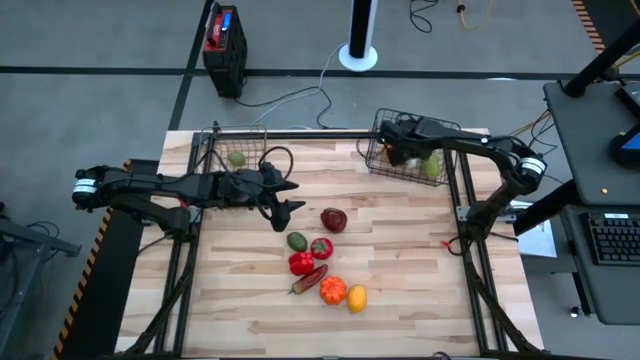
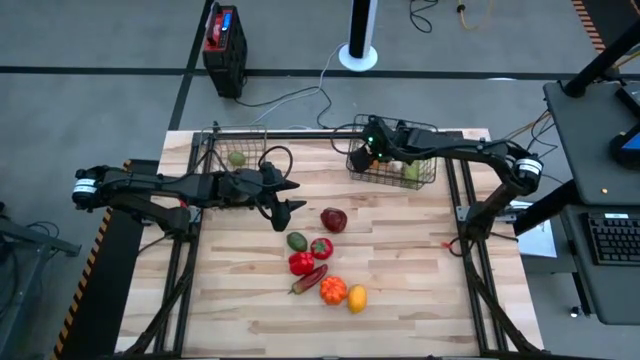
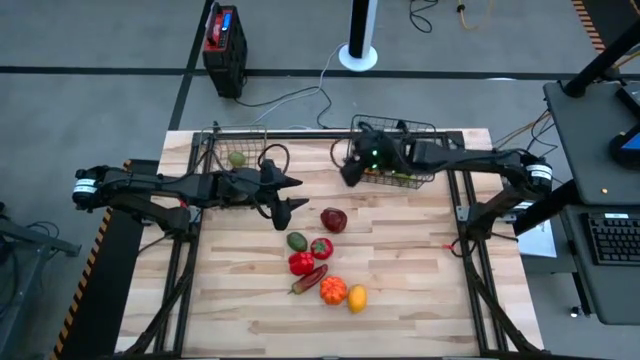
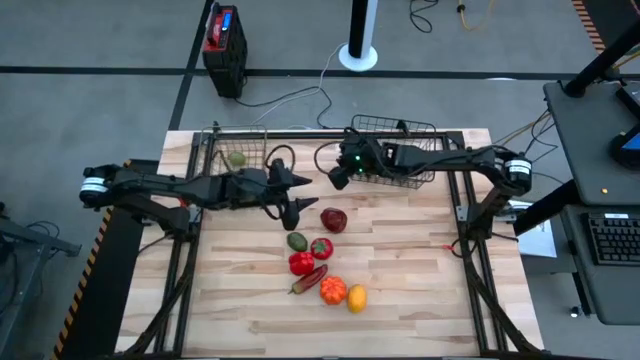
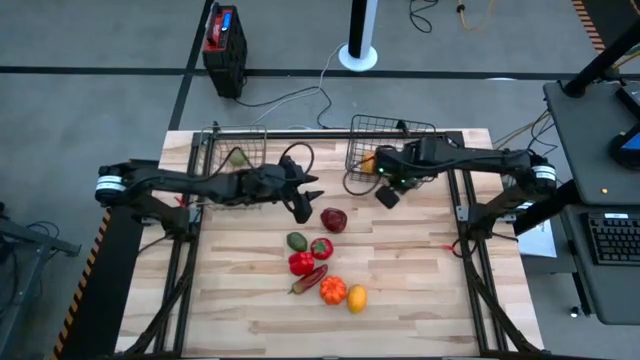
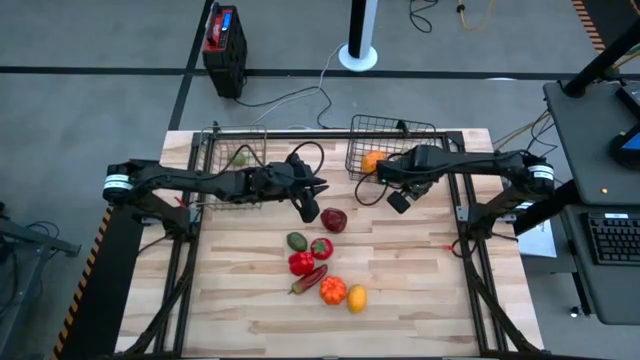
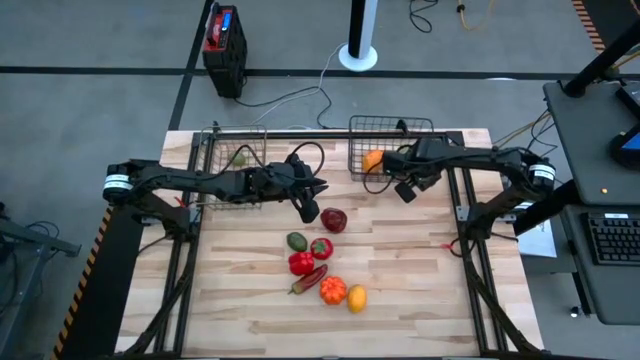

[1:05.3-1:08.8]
Task: Sort produce into baskets
Adjust the black wire basket

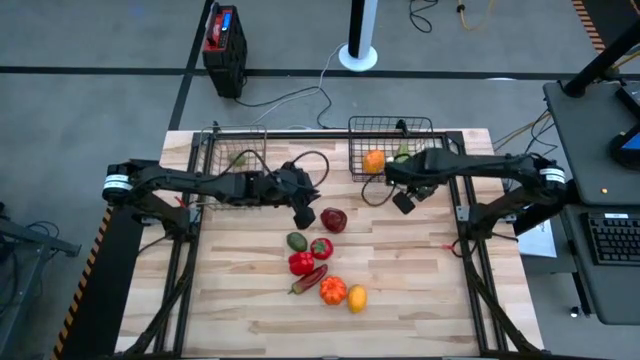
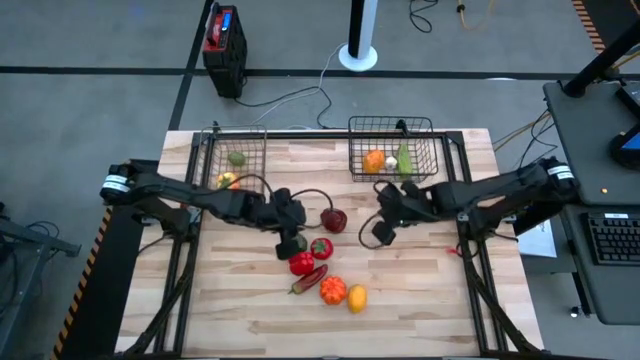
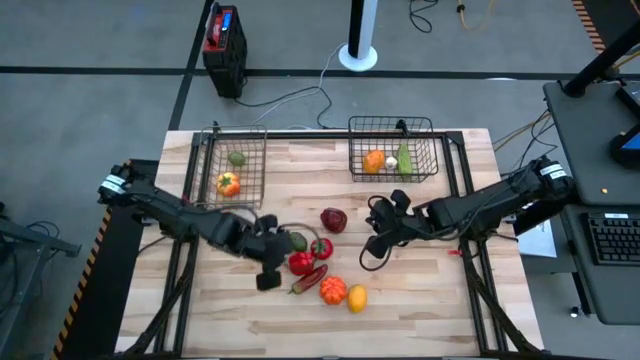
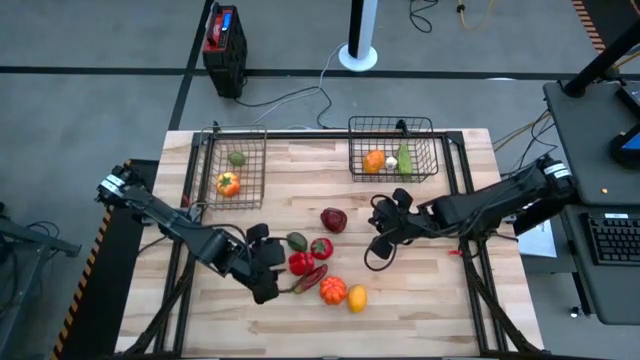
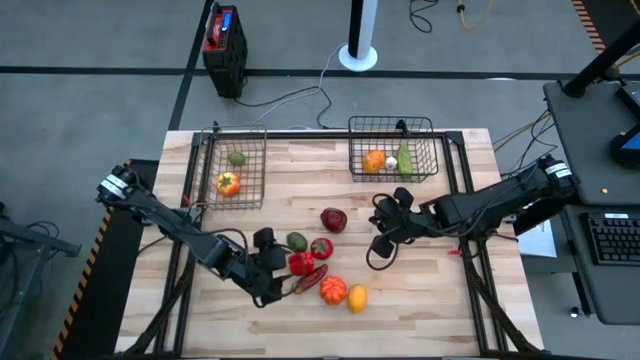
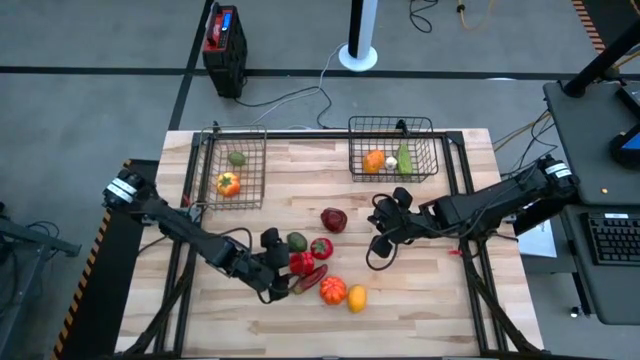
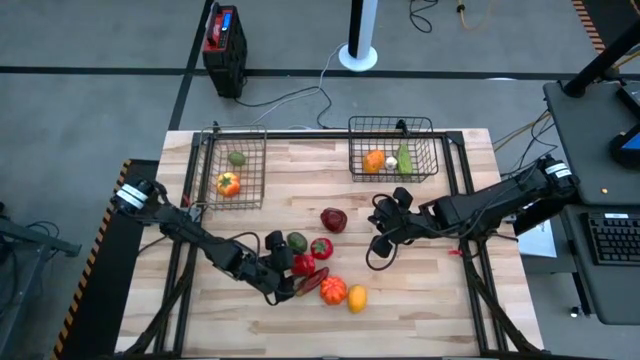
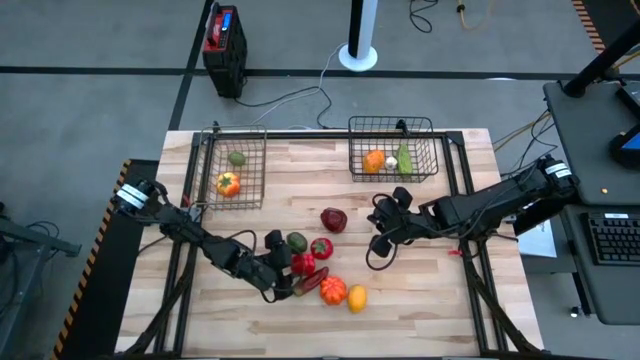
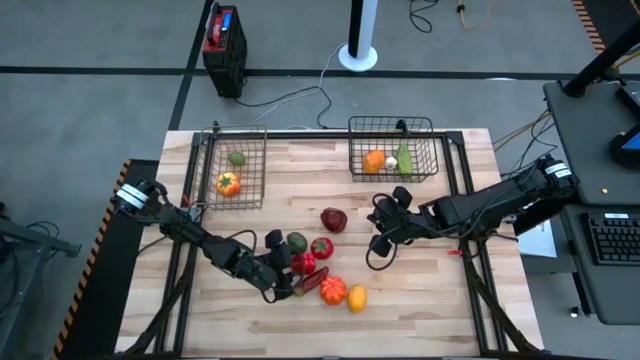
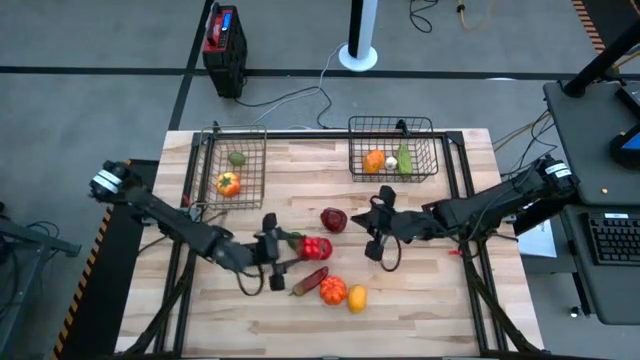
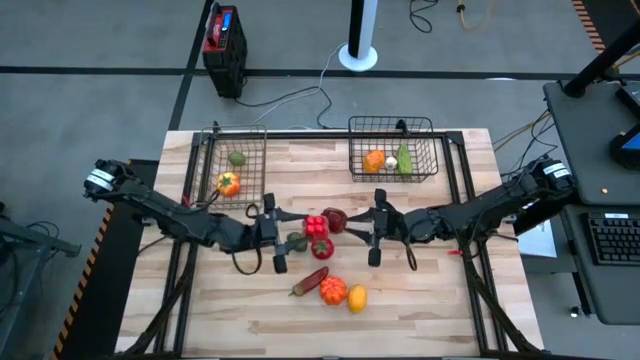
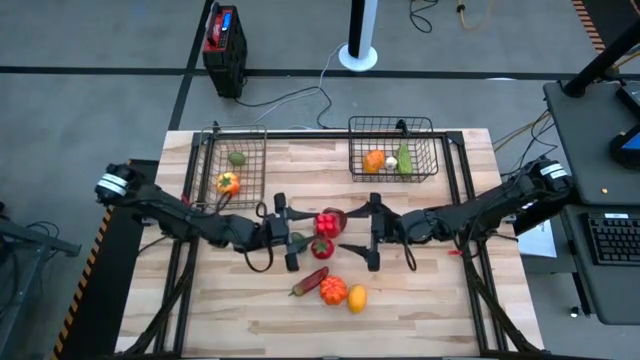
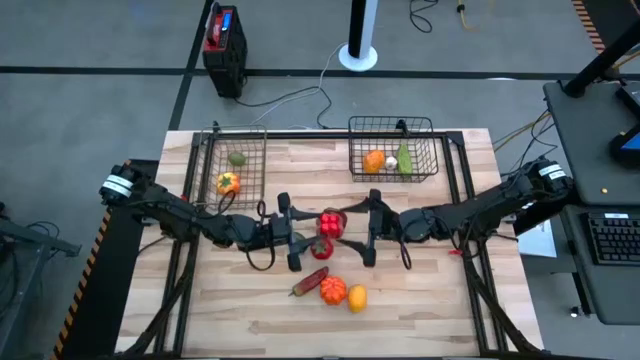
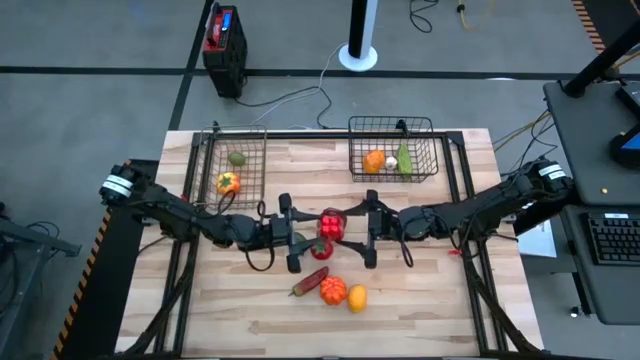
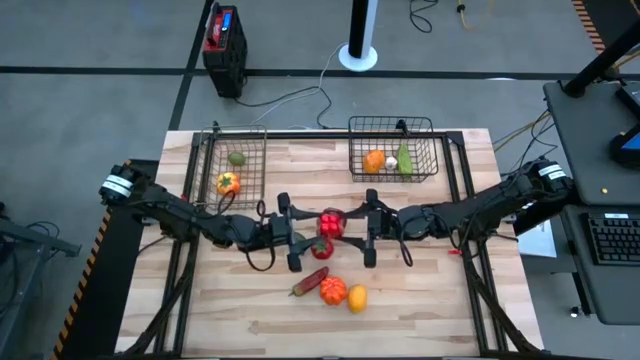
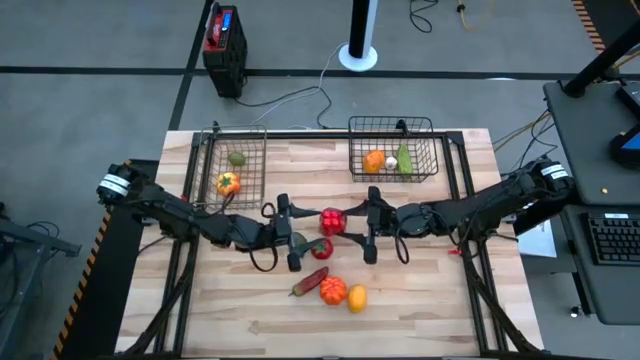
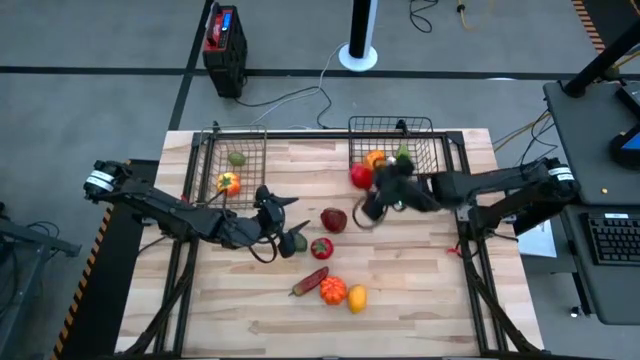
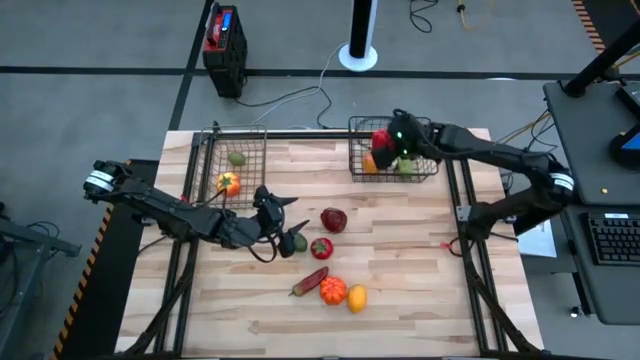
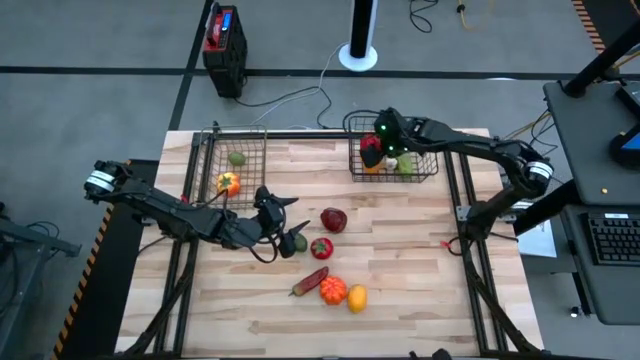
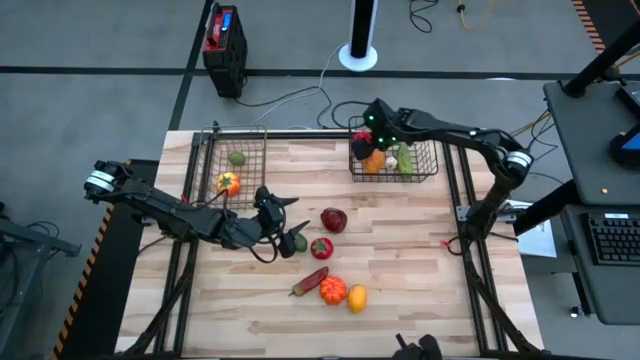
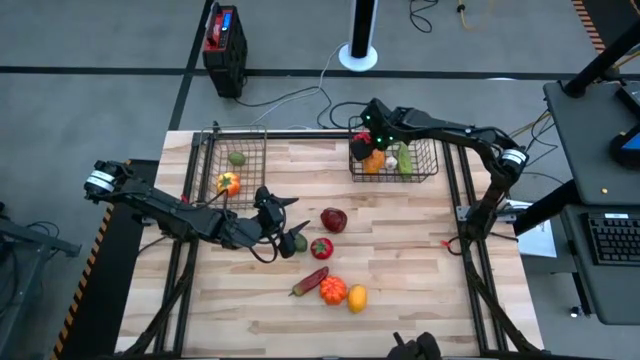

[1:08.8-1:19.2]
Put the bell pepper into the black wire basket

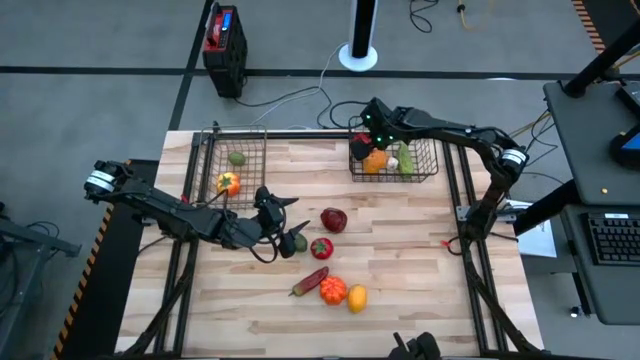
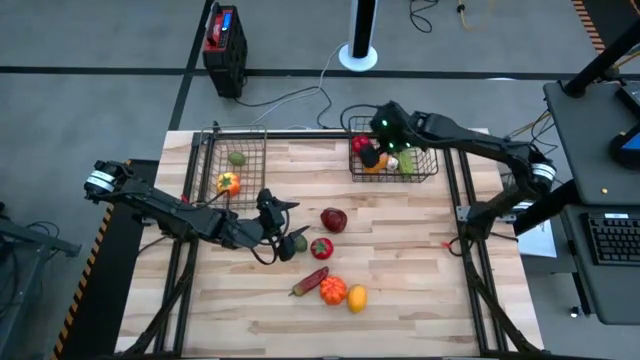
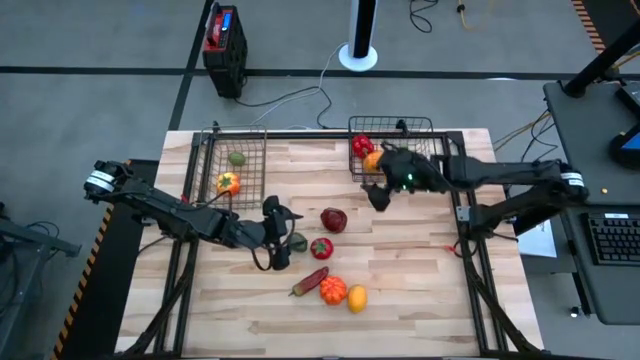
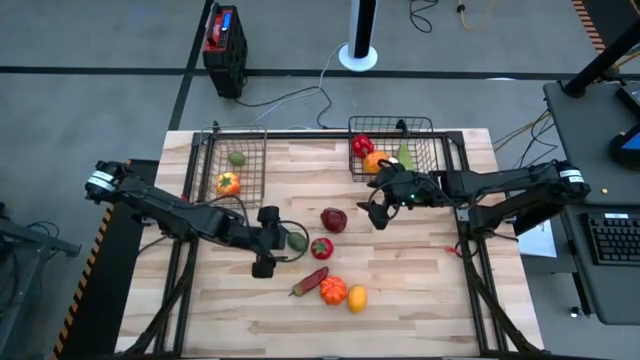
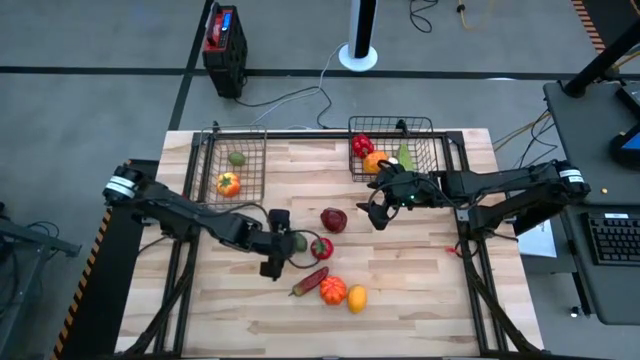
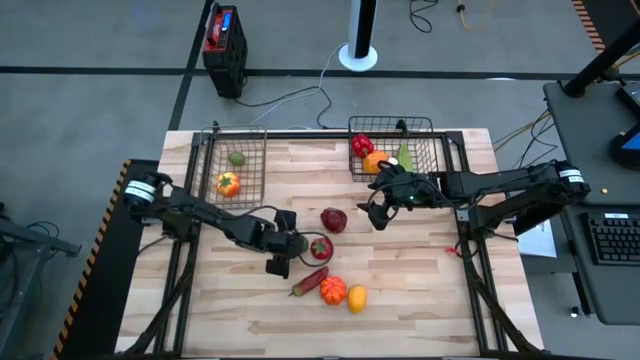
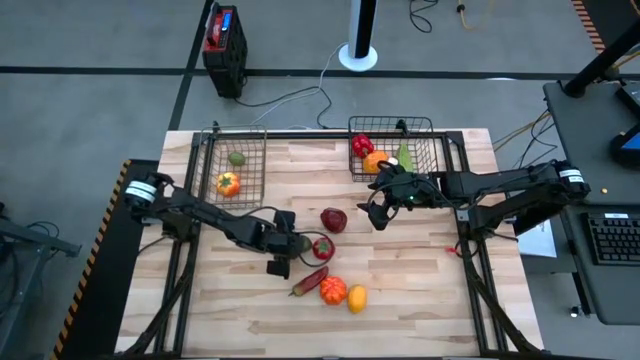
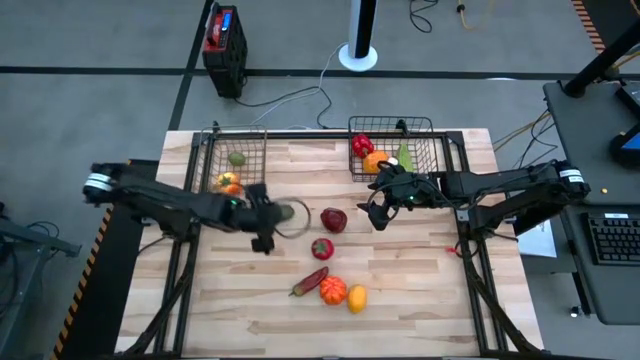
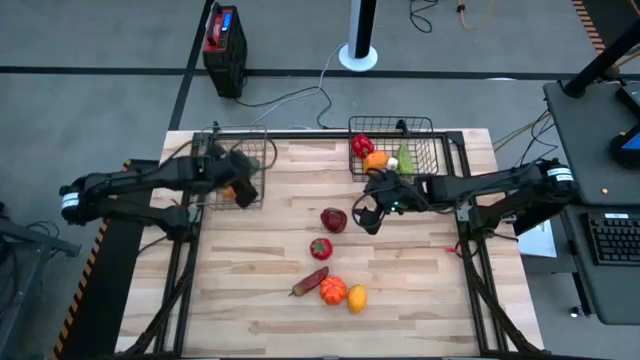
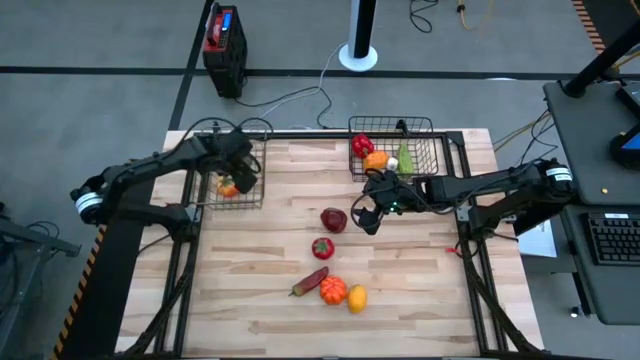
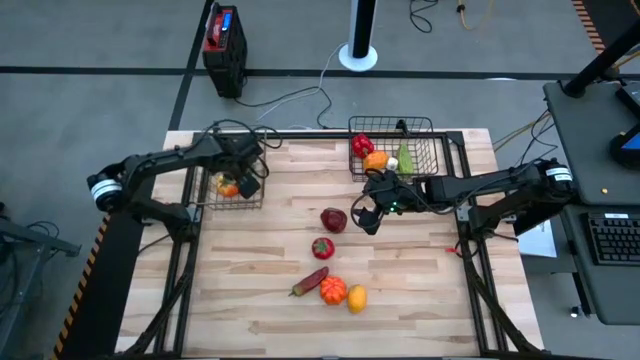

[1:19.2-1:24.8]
Put the lime into the brown wire basket
